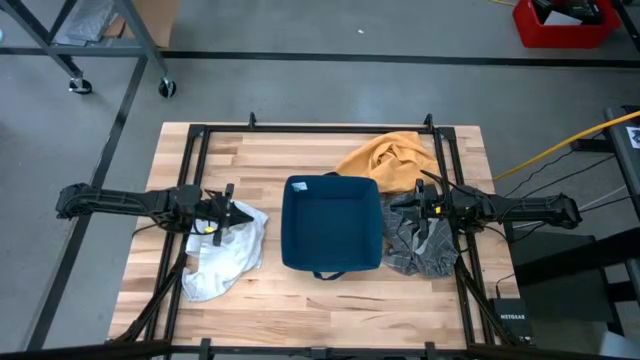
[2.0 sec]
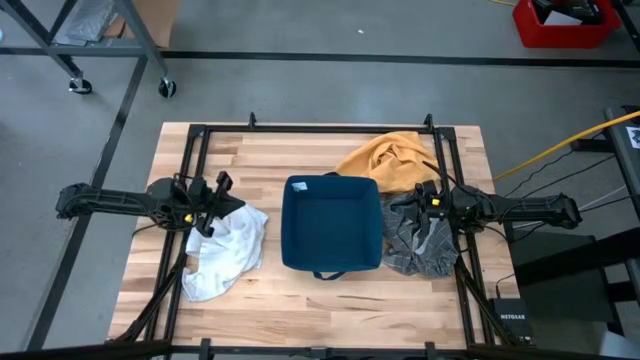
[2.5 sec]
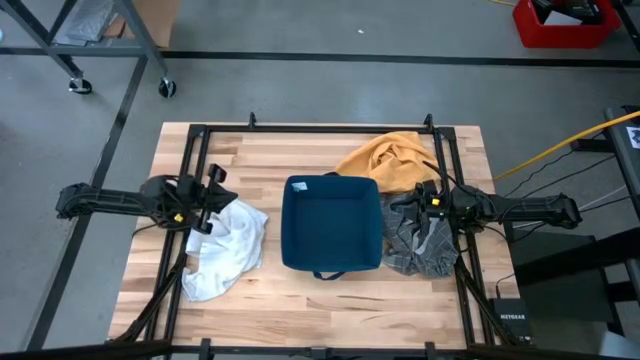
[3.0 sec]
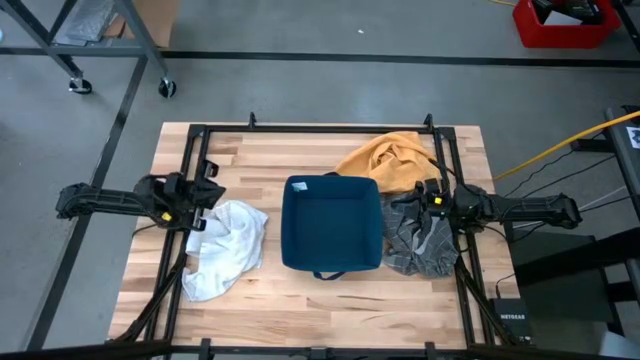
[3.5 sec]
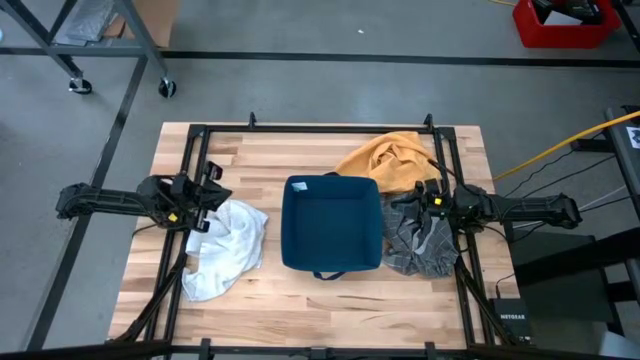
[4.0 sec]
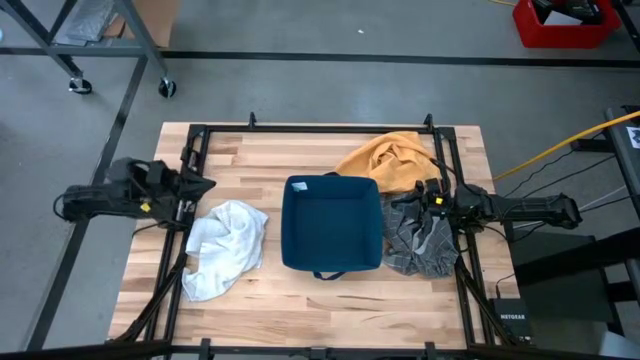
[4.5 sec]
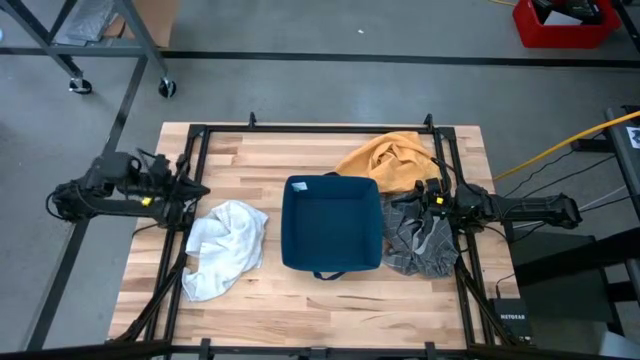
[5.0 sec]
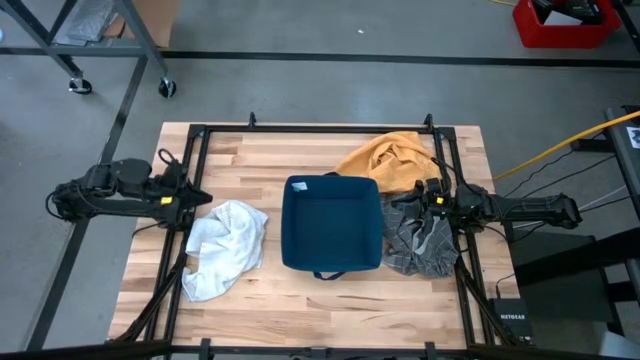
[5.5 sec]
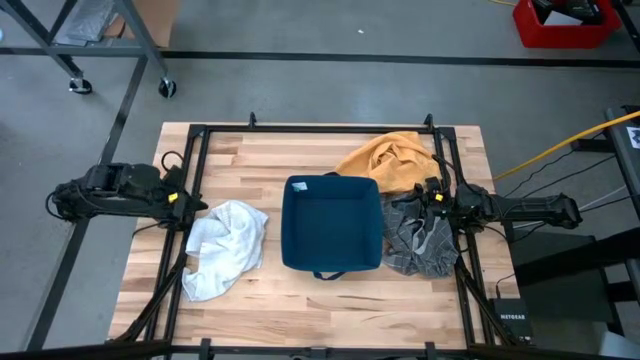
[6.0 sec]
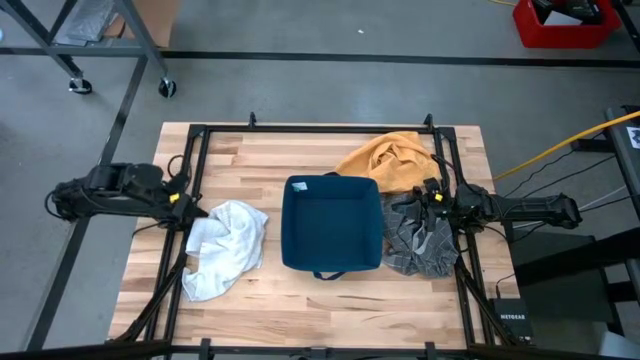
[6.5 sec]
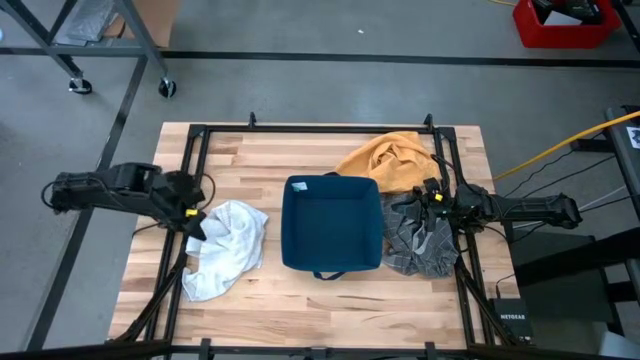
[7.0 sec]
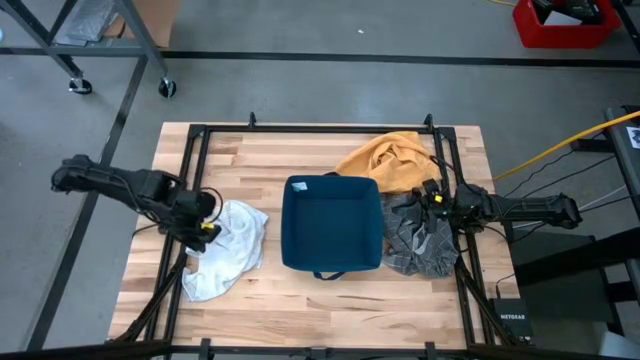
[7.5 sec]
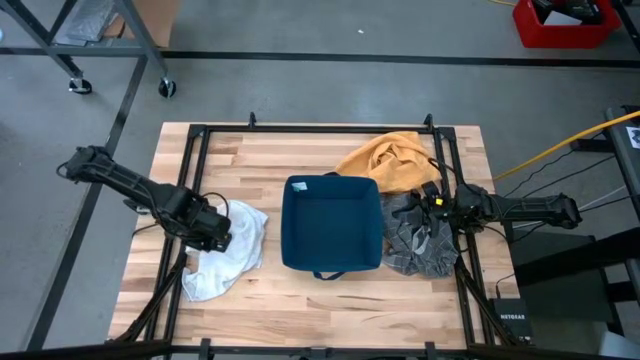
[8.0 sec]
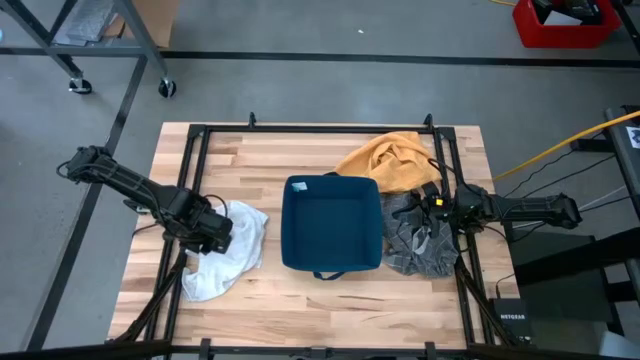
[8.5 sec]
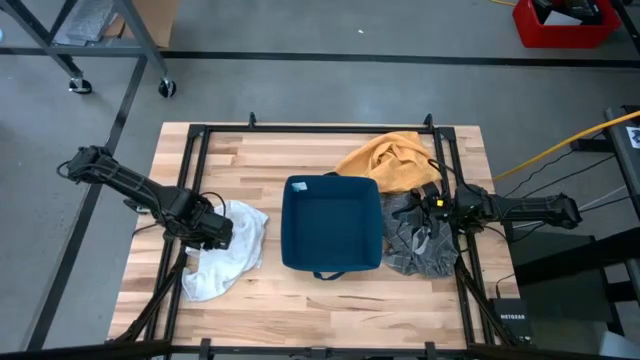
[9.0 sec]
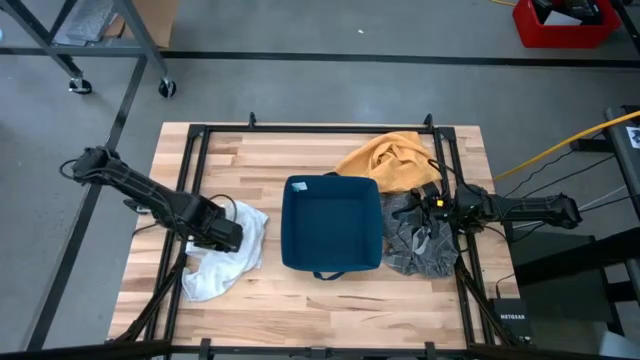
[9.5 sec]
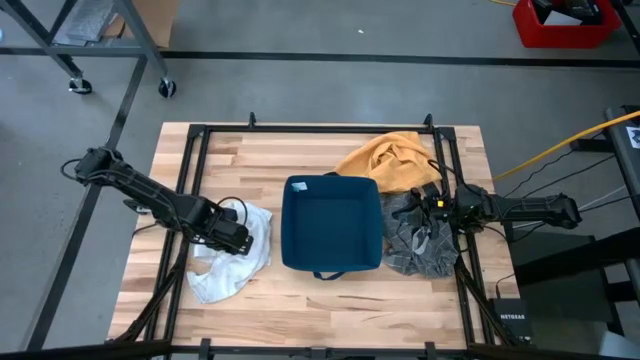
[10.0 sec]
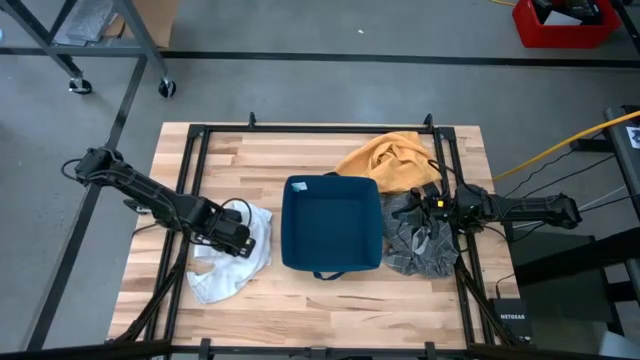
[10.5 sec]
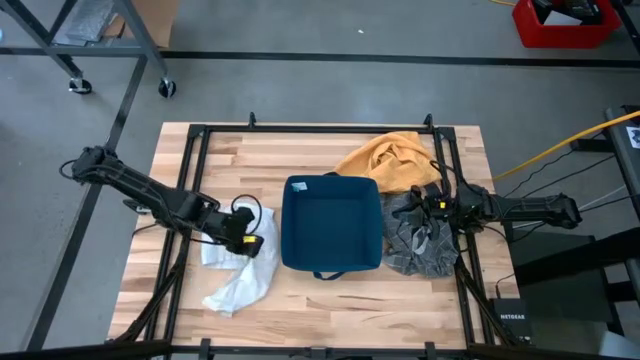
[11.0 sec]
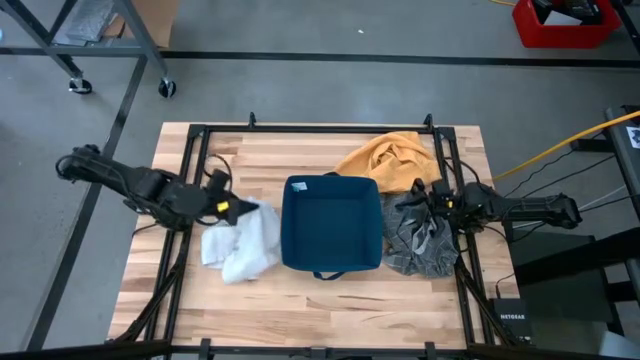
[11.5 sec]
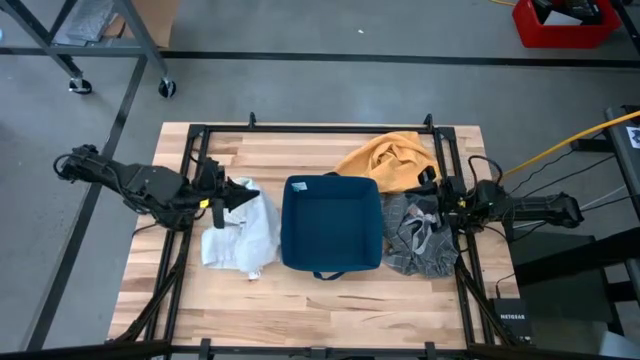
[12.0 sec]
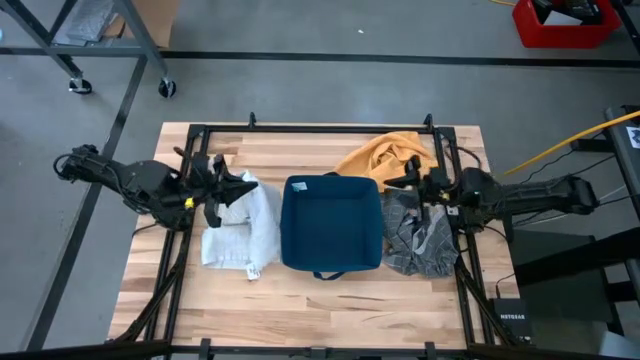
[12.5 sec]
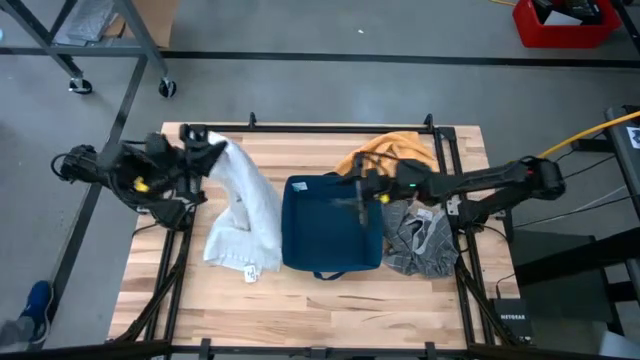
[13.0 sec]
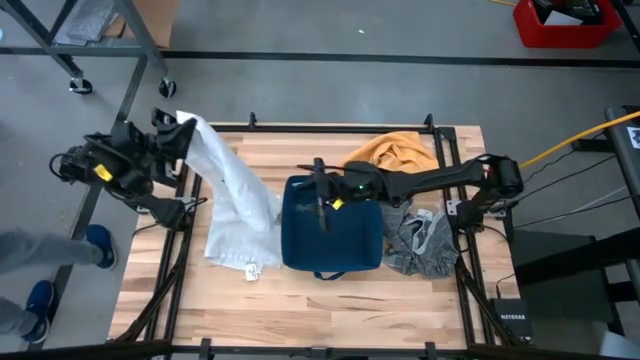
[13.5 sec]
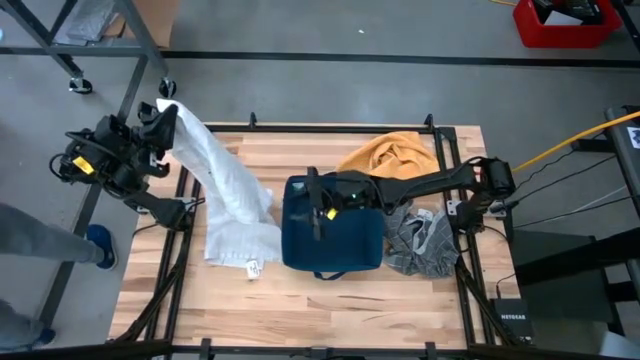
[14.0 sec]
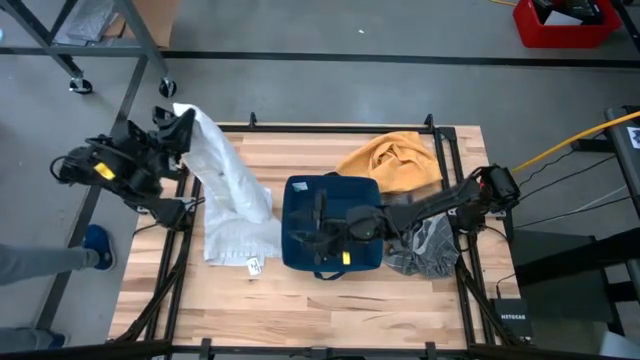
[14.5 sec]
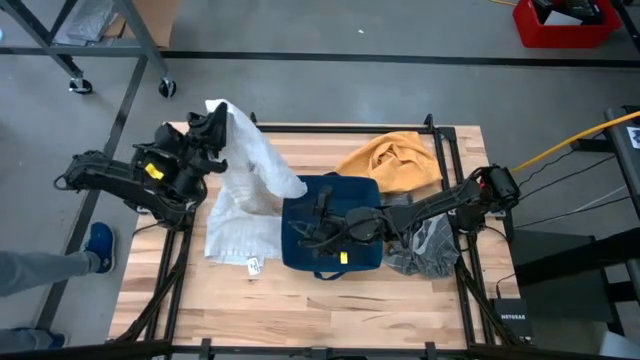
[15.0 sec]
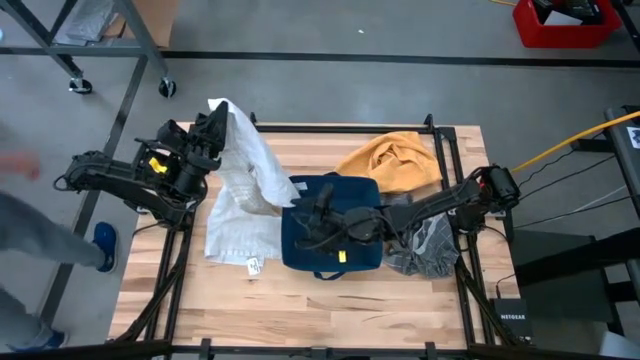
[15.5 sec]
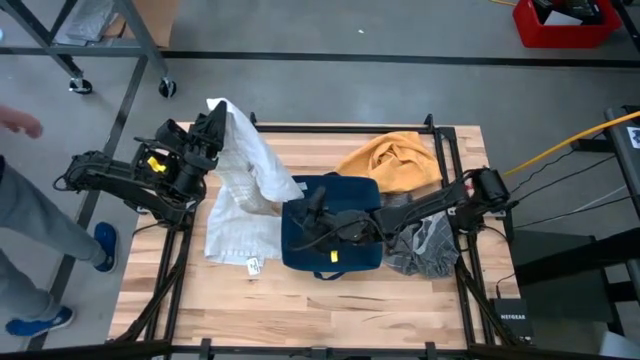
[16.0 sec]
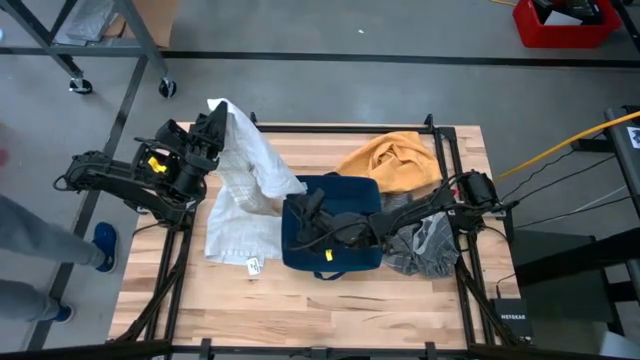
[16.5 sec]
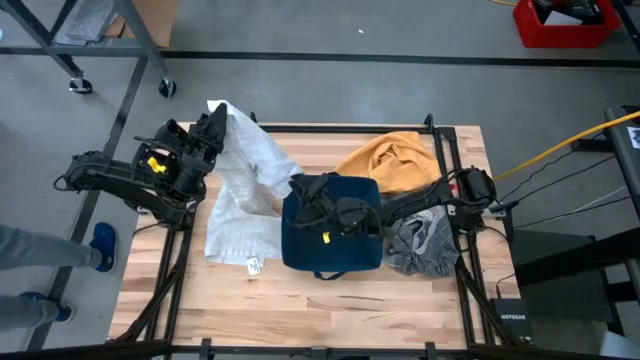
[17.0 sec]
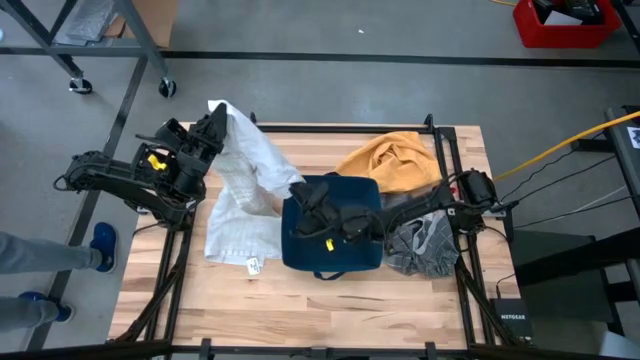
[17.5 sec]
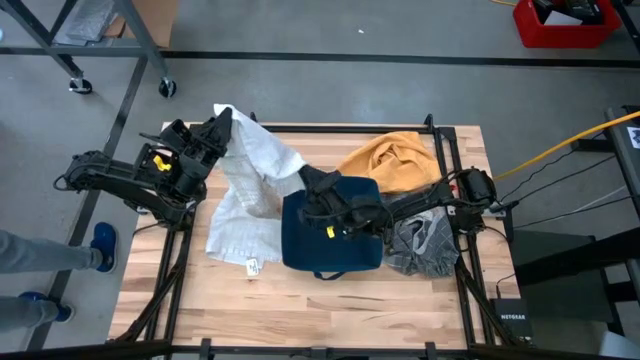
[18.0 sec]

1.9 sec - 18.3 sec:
Task: Fold towel
Fold the white patterned towel

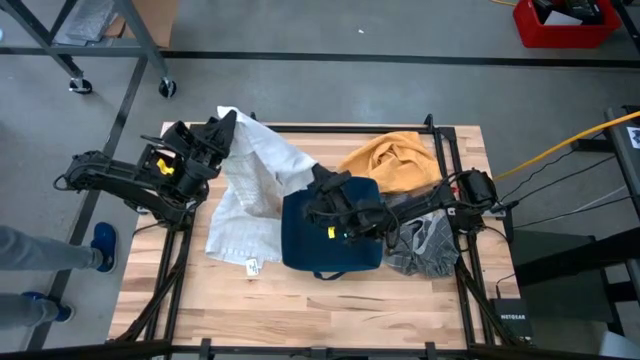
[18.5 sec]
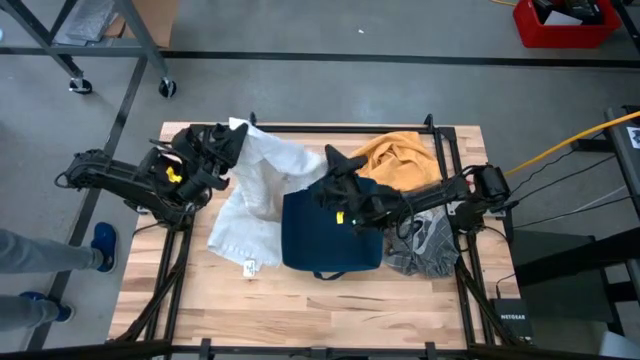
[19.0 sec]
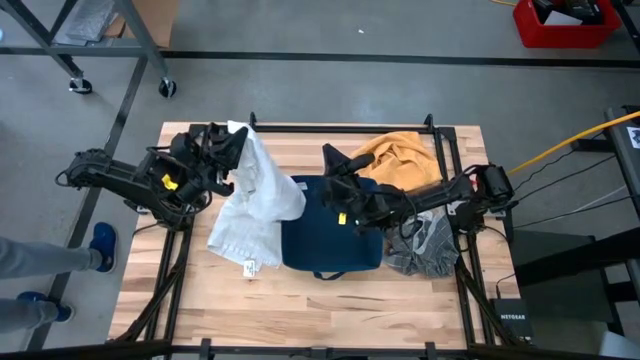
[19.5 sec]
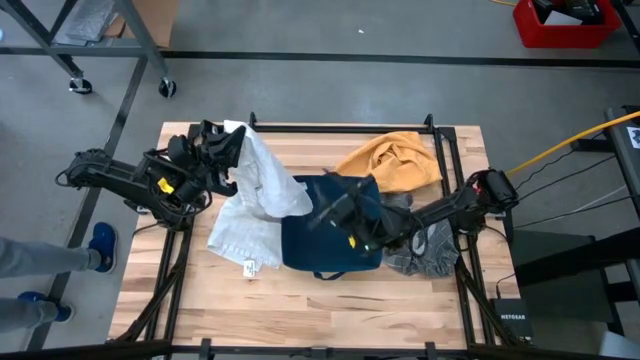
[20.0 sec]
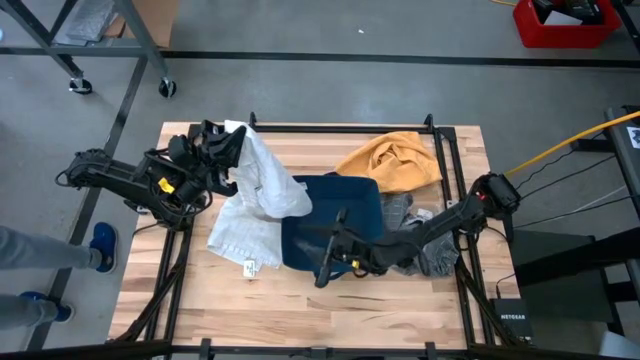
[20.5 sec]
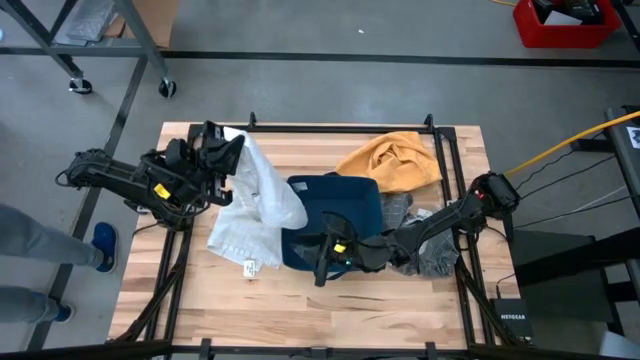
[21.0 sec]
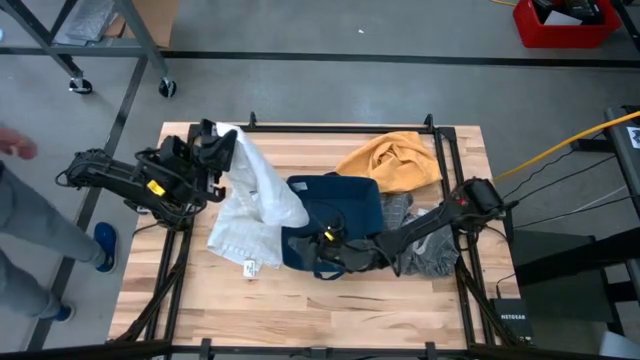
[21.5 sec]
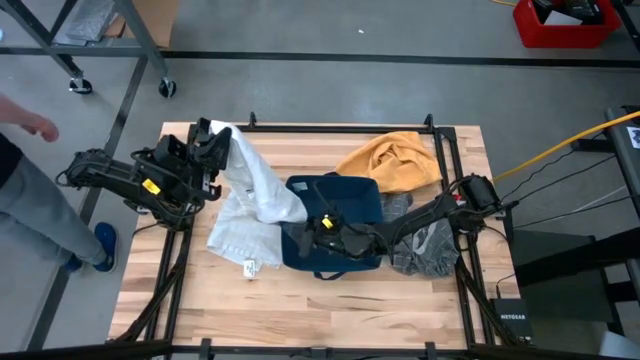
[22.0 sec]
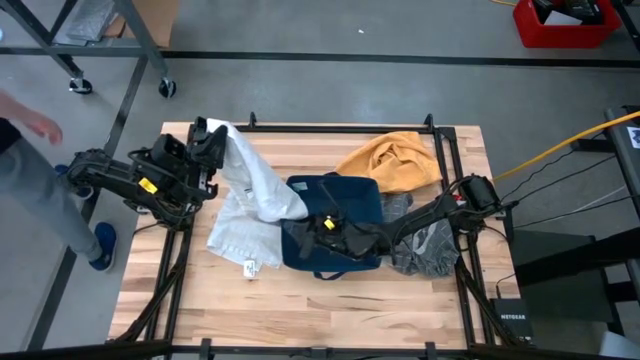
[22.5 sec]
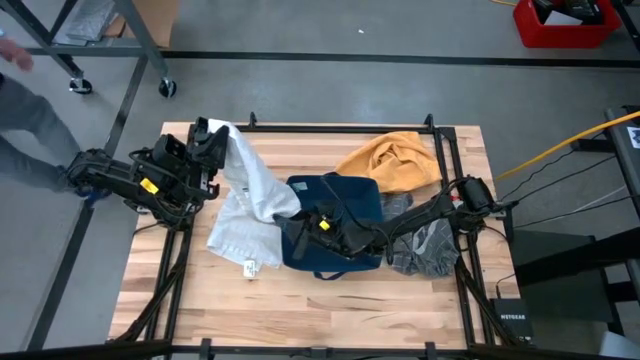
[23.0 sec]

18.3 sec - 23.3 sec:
Fold the white patterned towel
